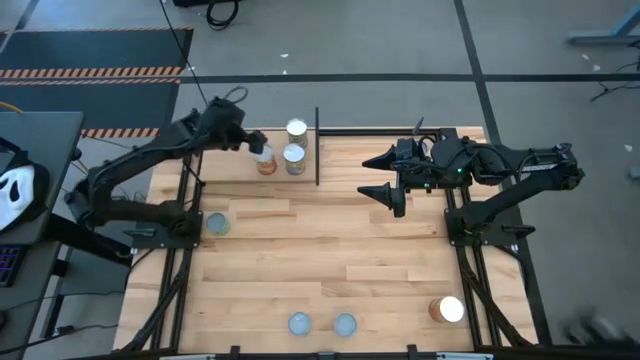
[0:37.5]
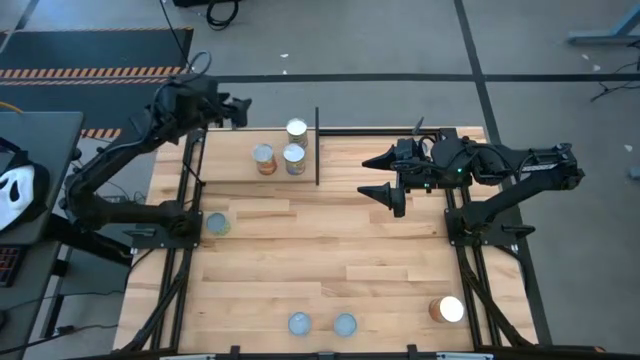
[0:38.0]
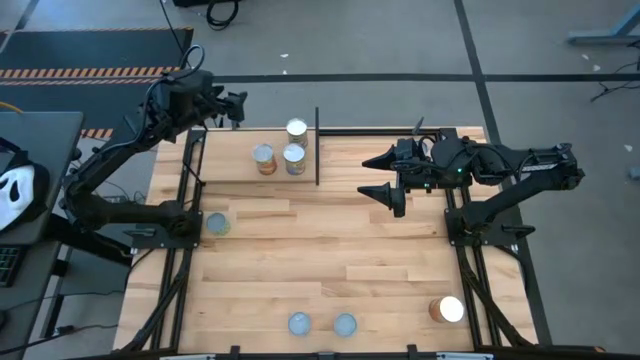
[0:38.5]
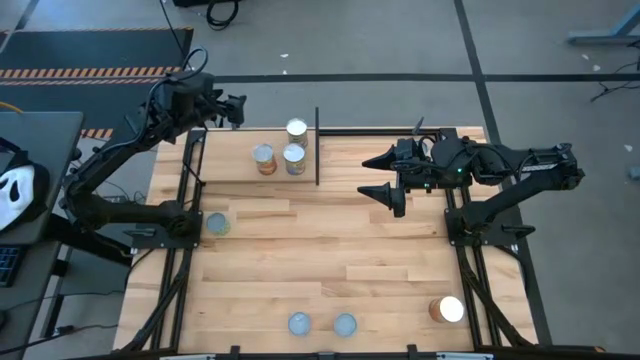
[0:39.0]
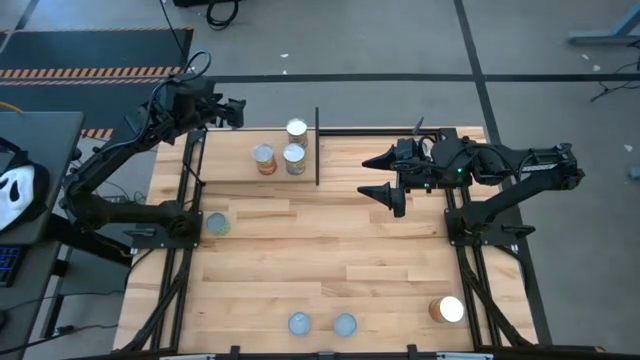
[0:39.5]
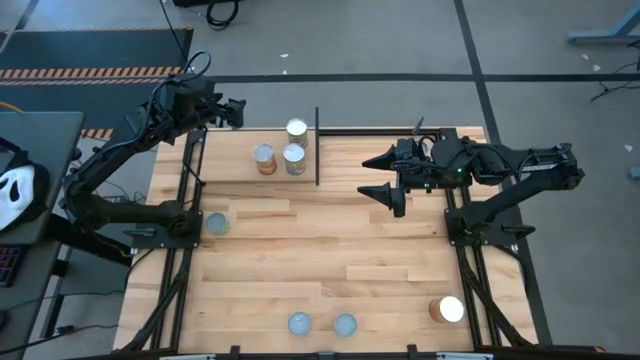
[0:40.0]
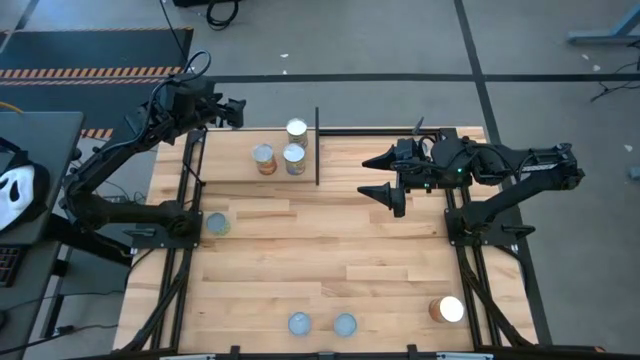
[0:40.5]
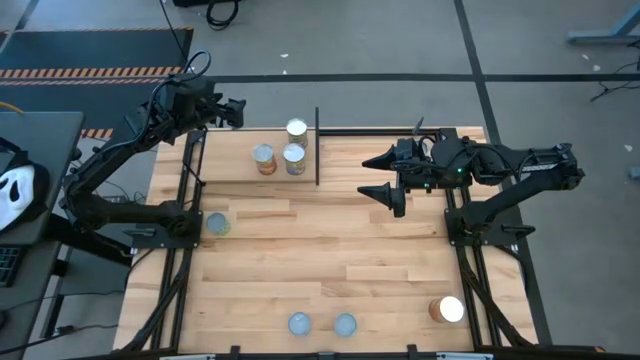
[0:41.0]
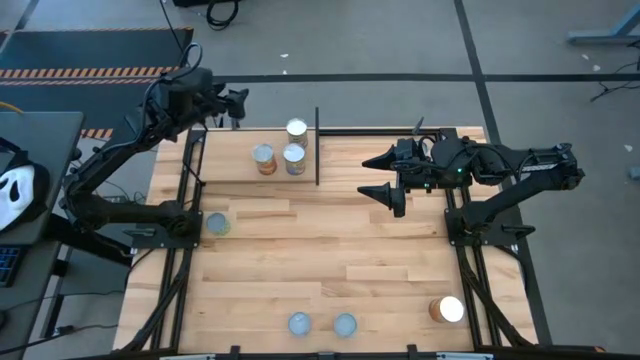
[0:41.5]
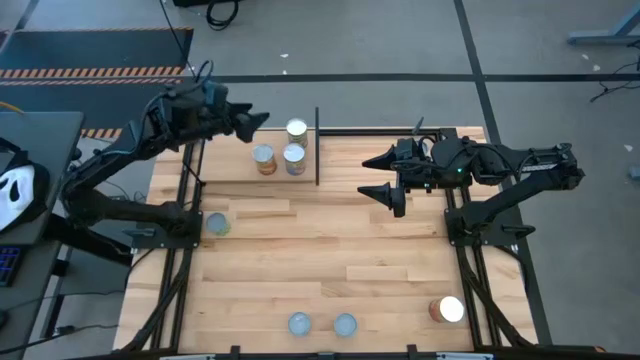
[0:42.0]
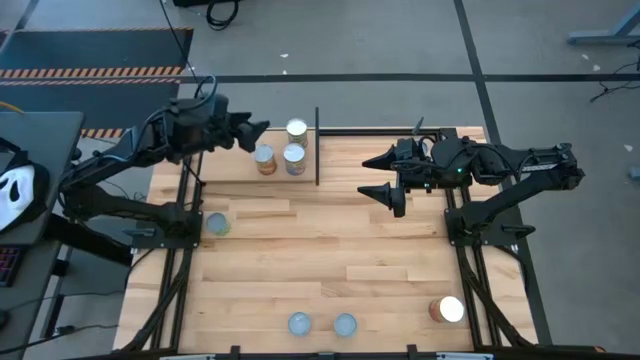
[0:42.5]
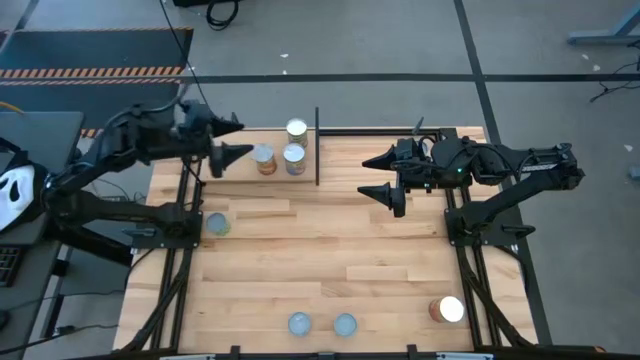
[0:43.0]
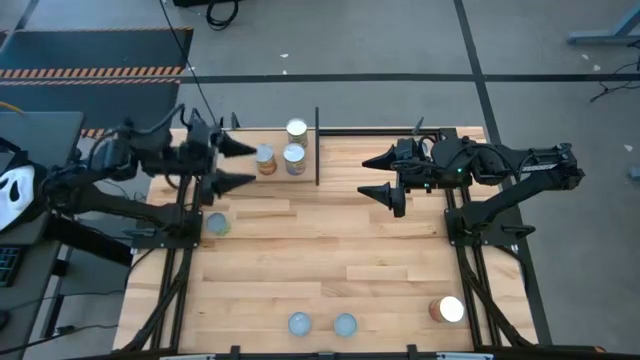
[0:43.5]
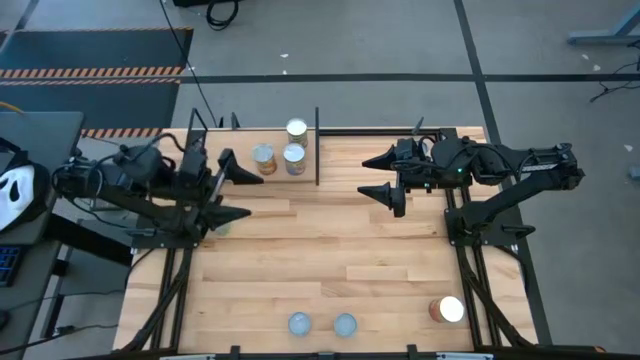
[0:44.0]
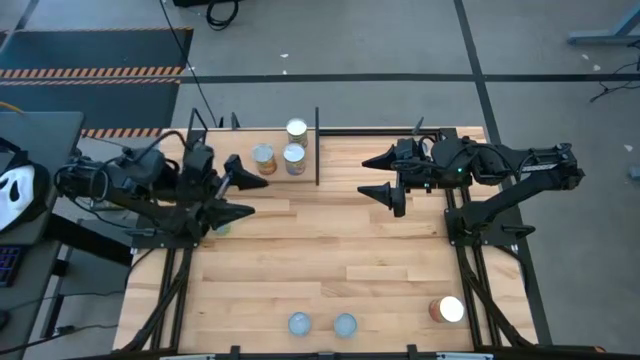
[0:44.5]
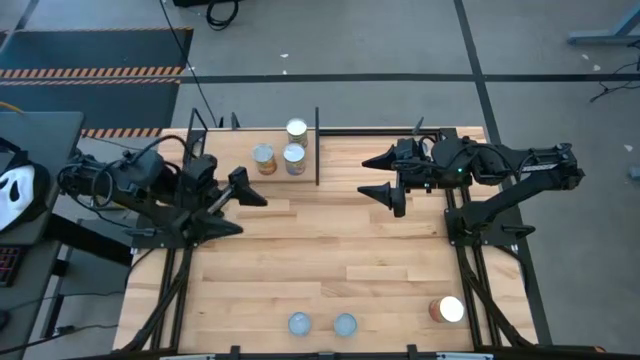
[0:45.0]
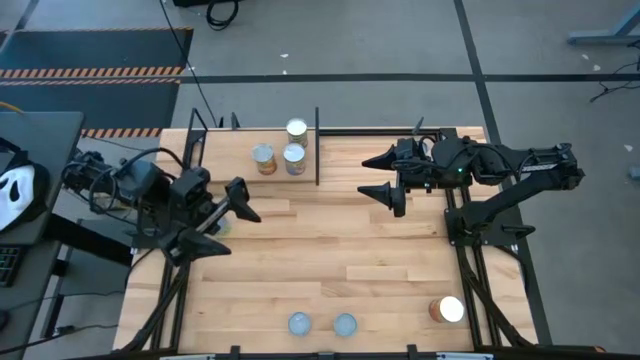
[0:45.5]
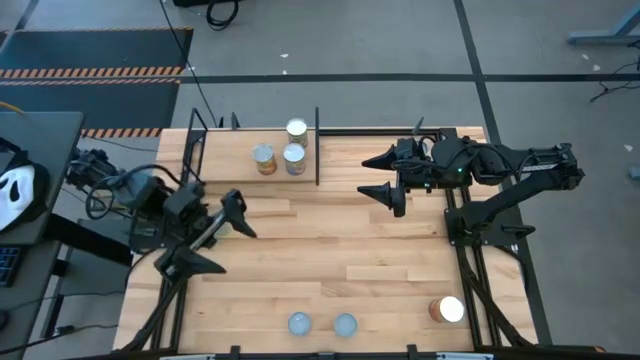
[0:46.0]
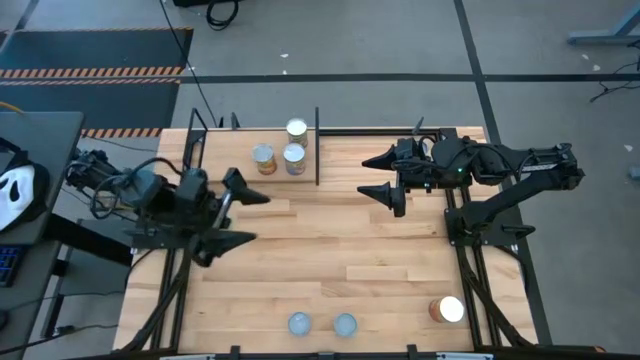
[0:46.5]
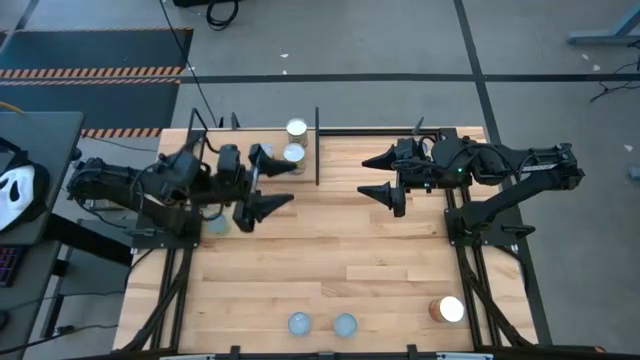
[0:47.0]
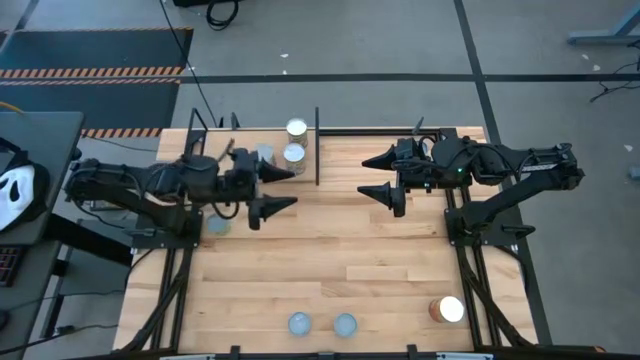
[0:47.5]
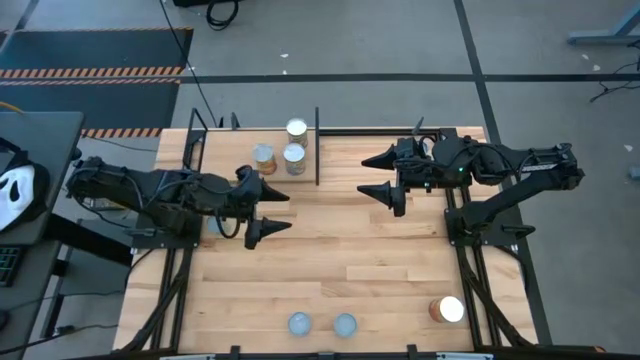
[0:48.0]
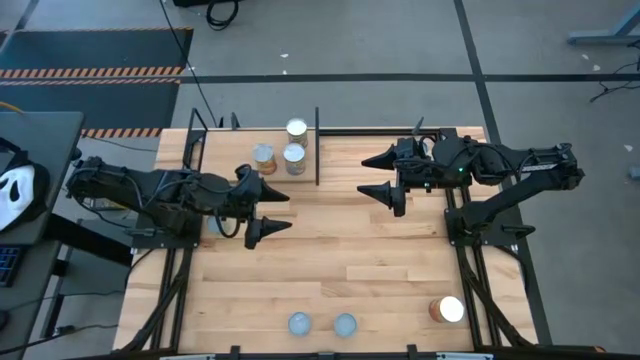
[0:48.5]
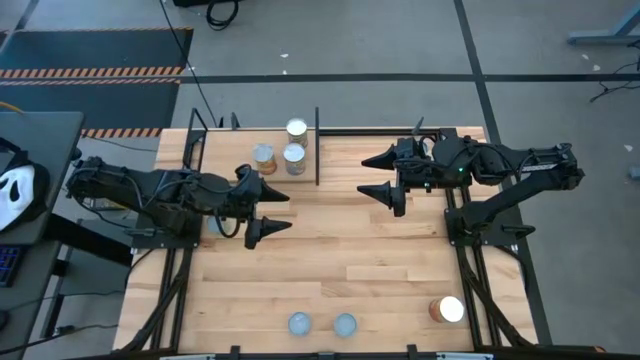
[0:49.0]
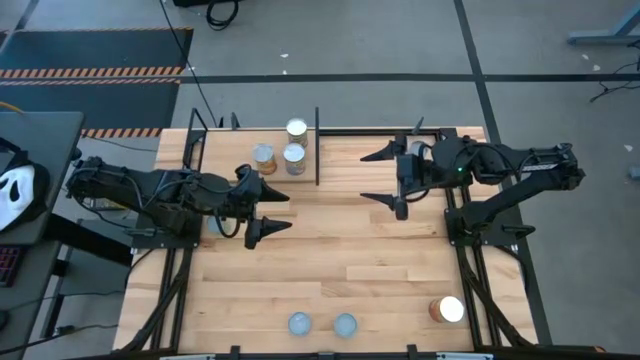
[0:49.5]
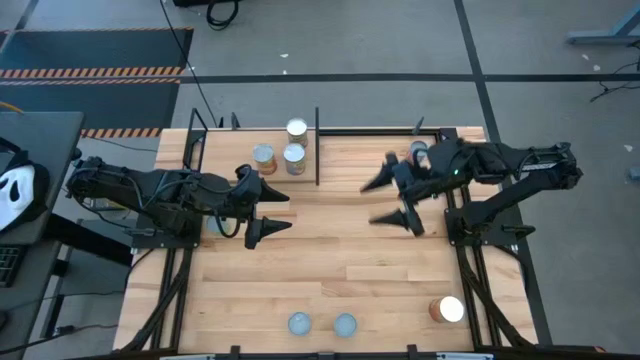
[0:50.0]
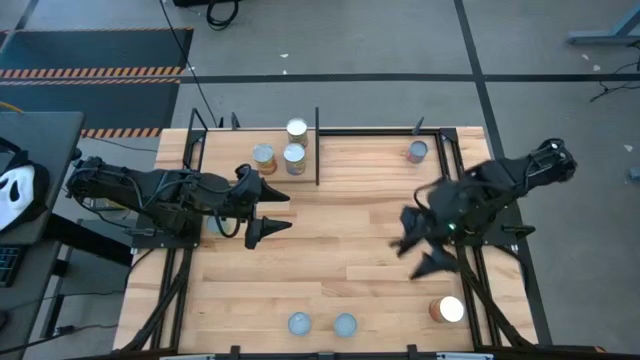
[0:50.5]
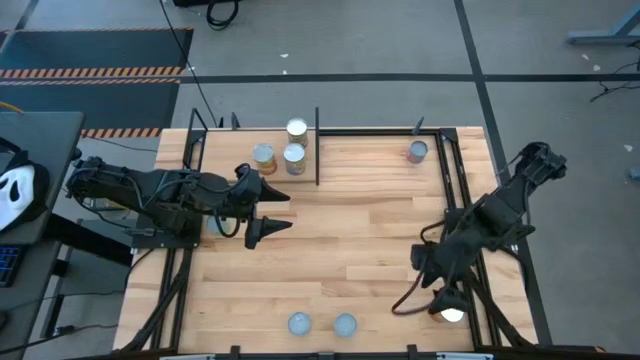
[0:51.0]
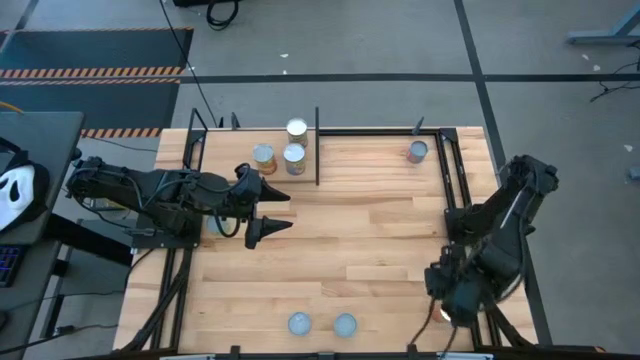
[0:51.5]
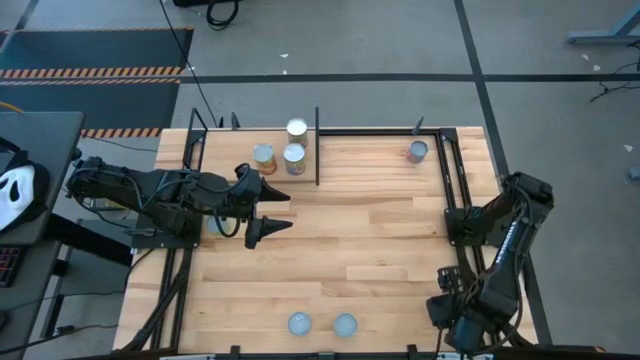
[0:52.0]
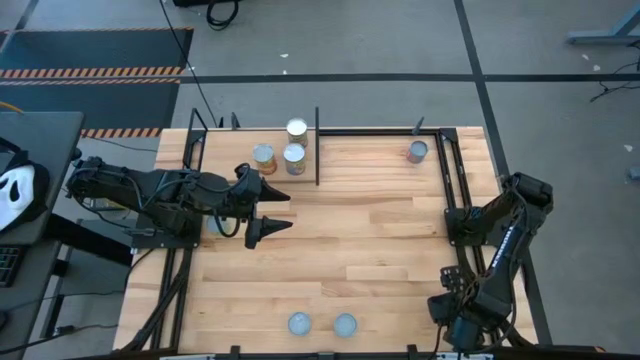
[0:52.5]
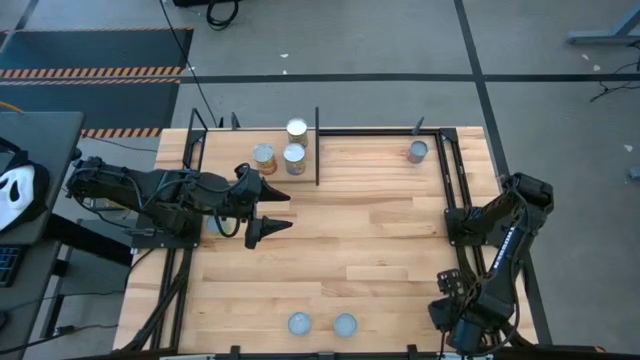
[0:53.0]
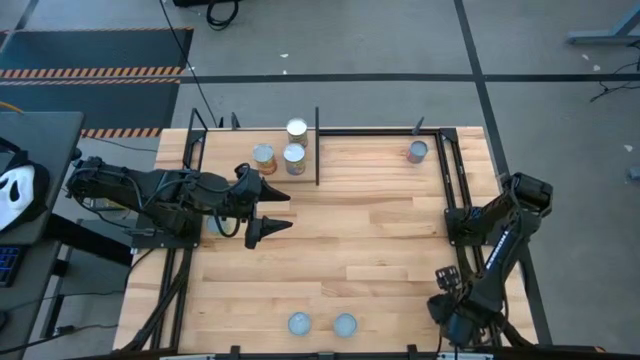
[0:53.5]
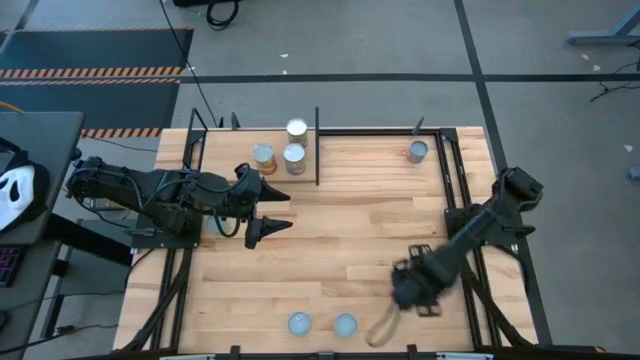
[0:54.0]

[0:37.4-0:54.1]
Task: Pick and place cans onto a shelf
Put the can of corn on the shelf

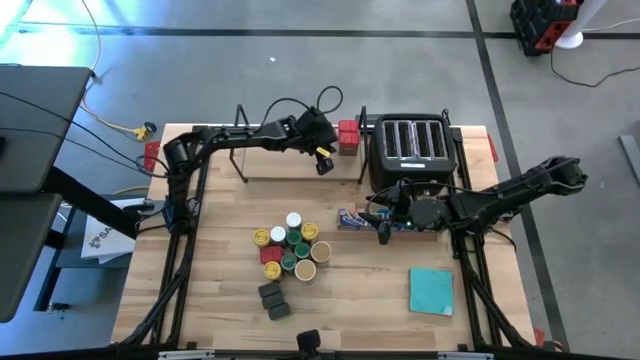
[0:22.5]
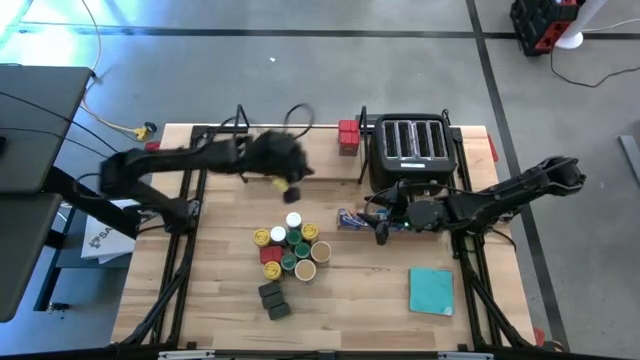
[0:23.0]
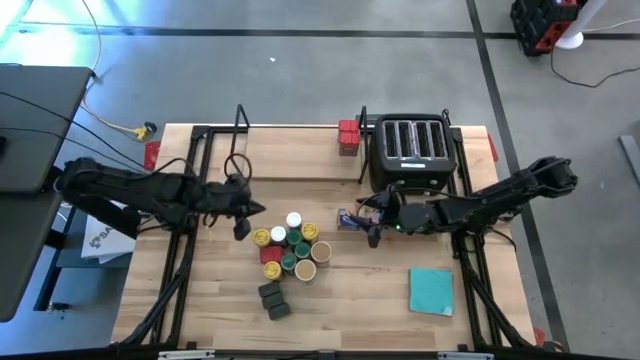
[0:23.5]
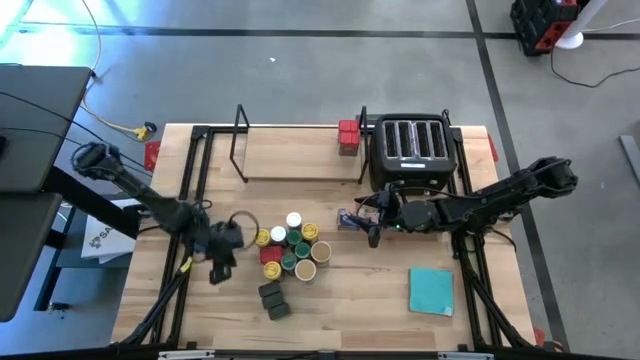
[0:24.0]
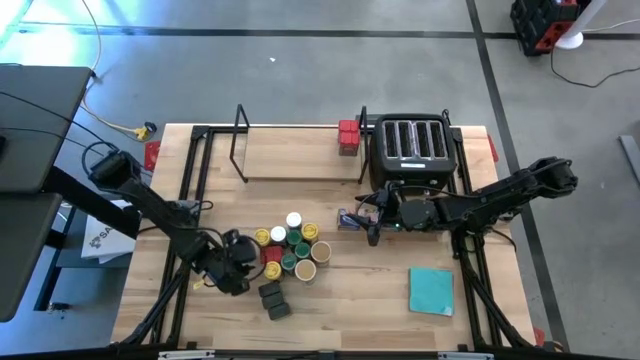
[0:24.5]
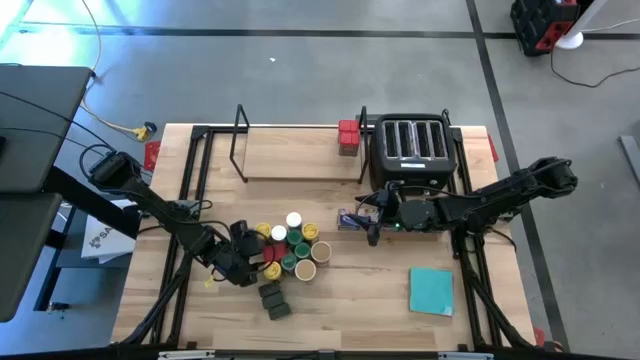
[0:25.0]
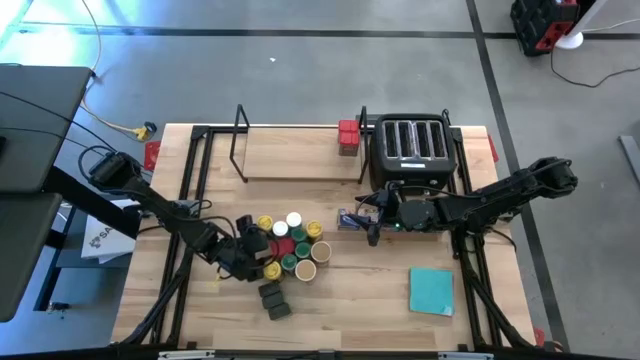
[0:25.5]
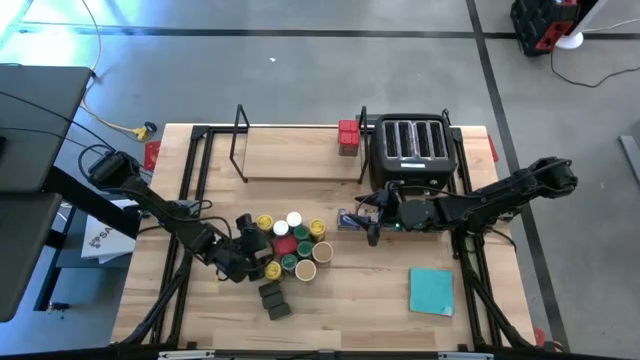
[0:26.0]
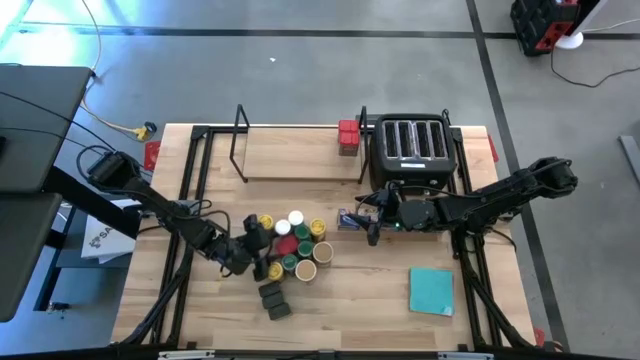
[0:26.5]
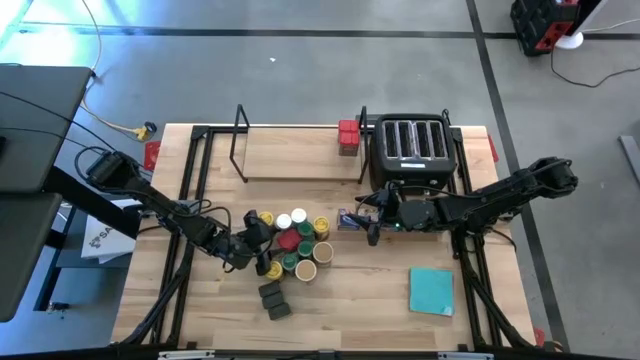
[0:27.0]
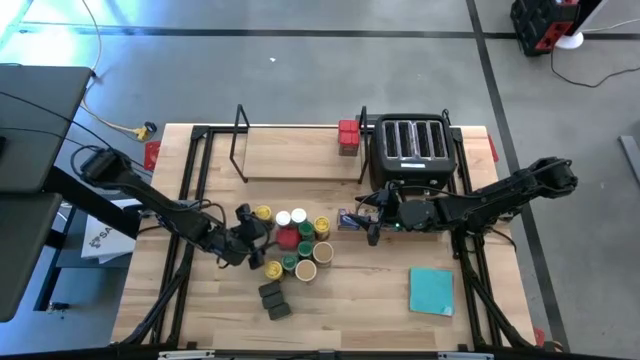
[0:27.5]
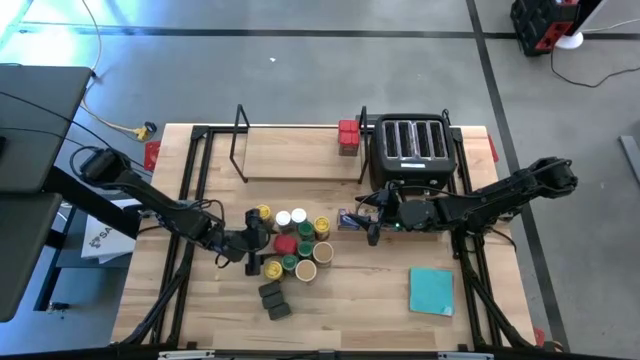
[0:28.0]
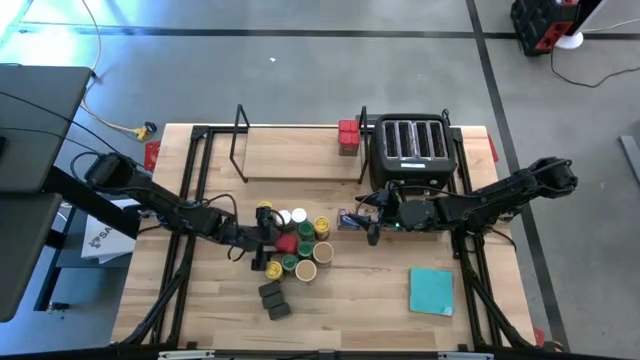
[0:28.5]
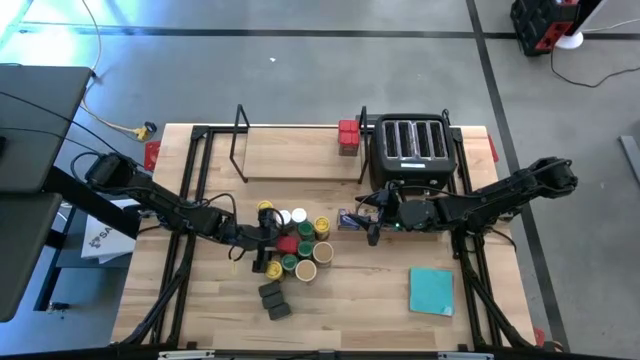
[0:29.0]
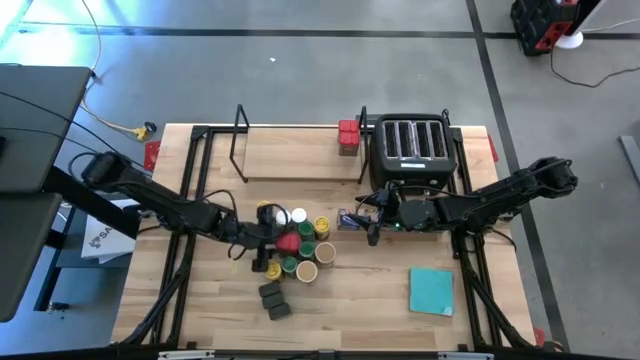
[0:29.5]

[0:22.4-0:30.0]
Task: Shelf spices
Put the red seasoning can on the shelf aligned with the other red seasoning cans
